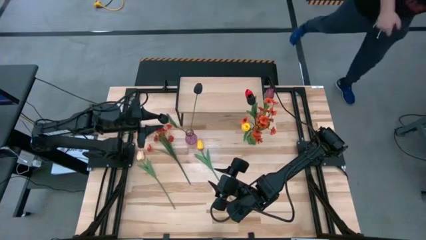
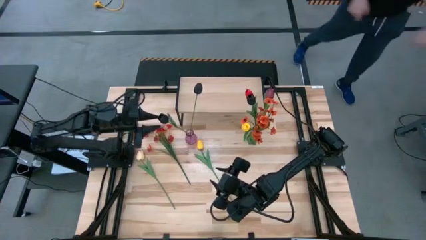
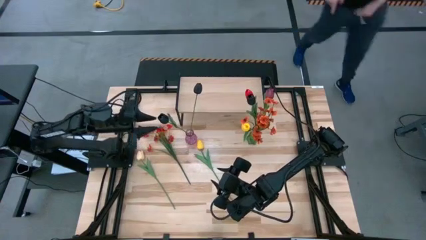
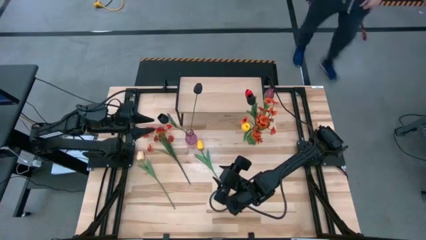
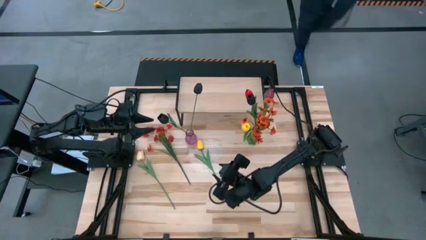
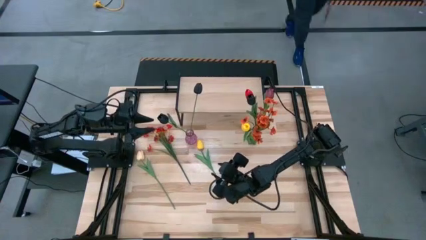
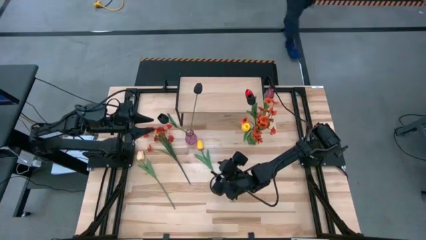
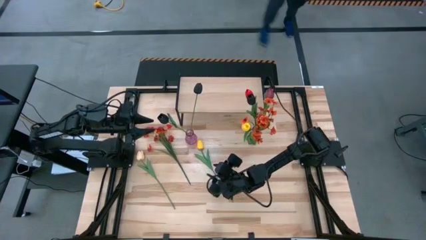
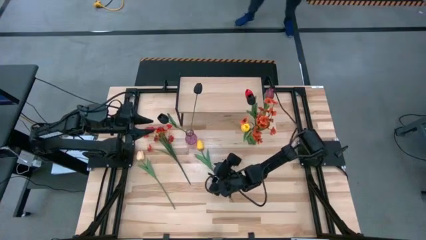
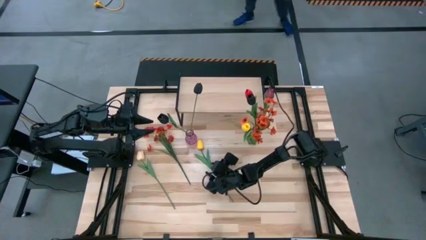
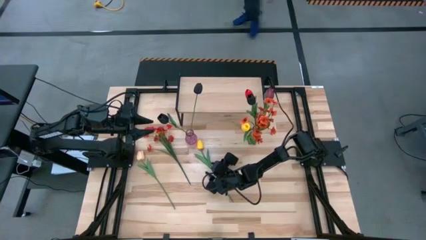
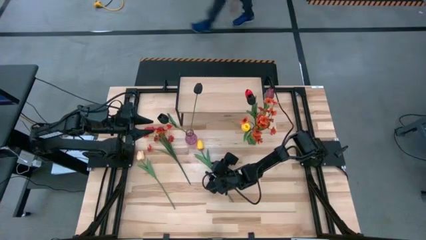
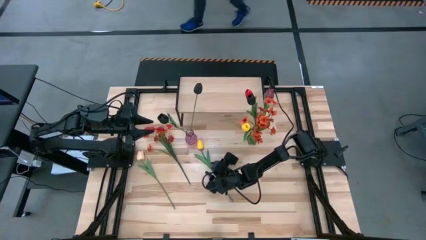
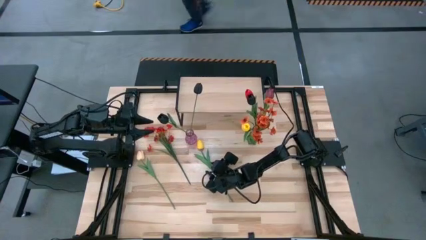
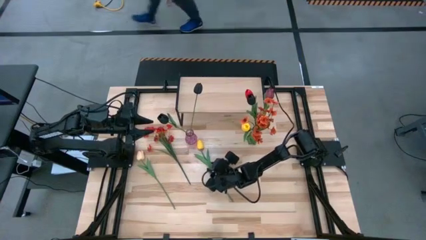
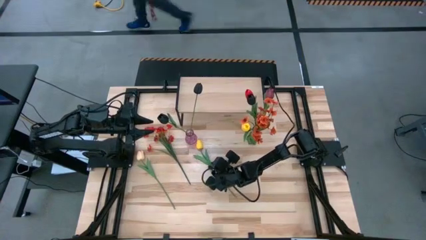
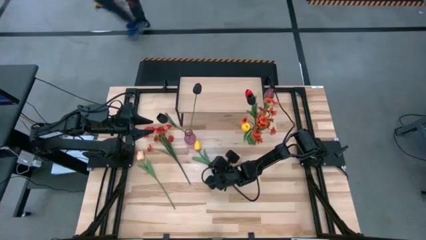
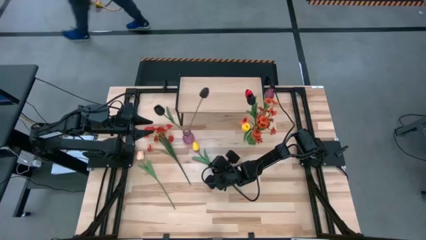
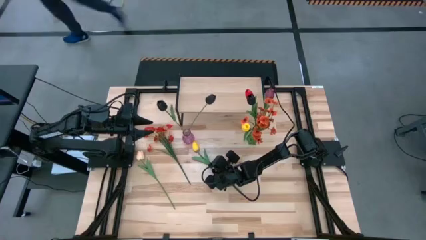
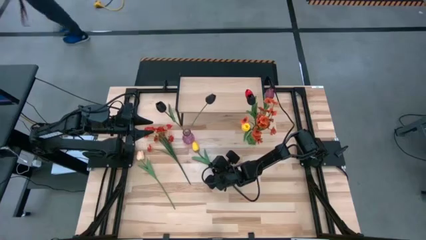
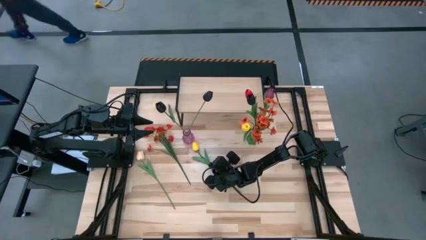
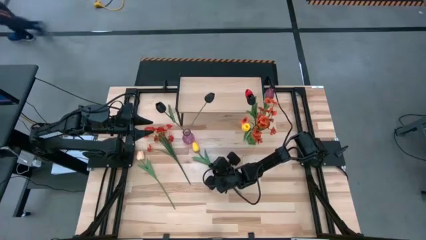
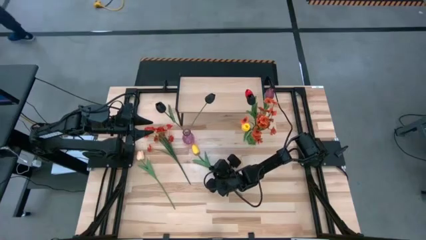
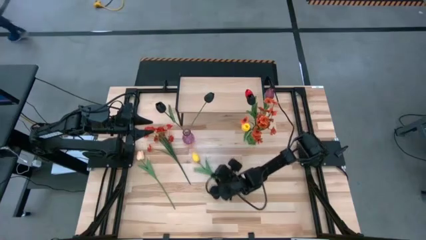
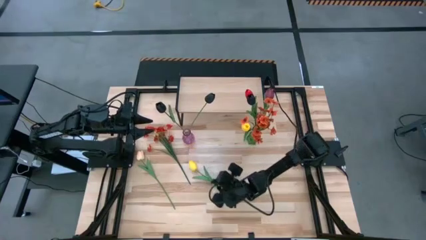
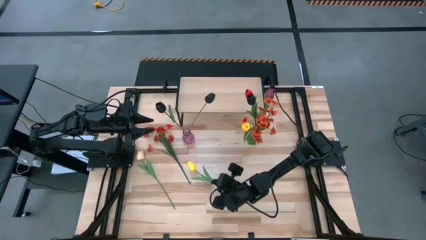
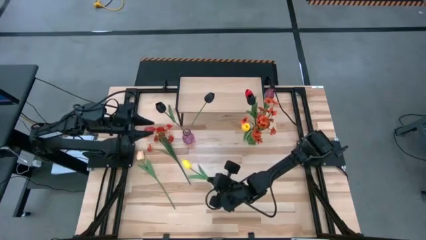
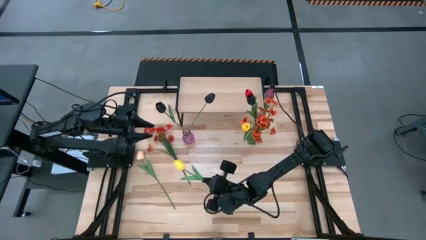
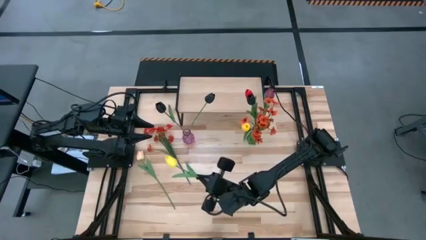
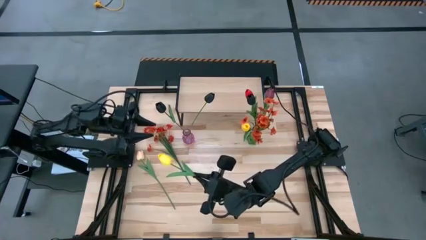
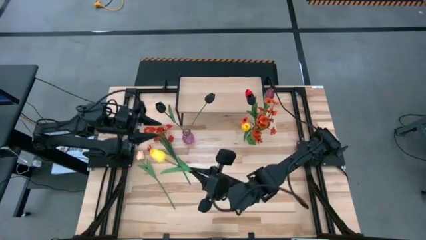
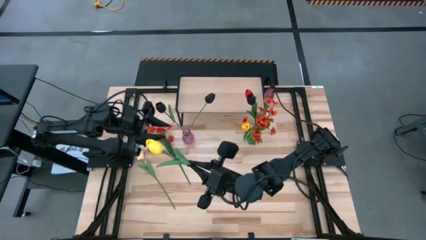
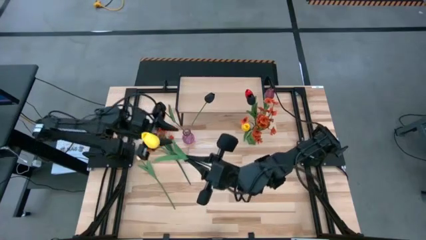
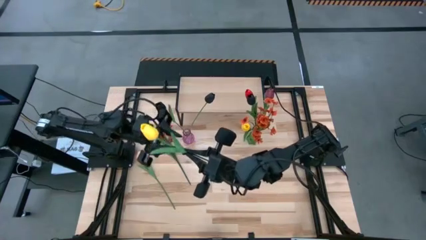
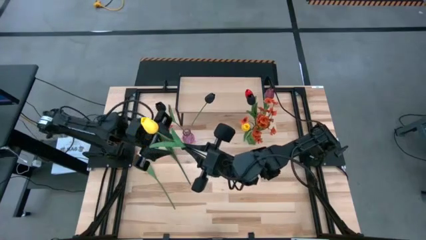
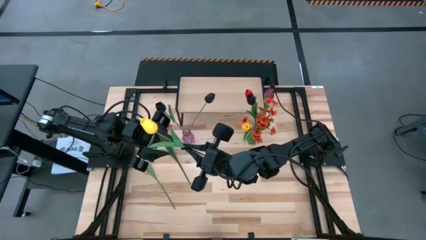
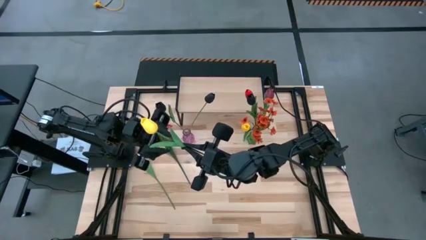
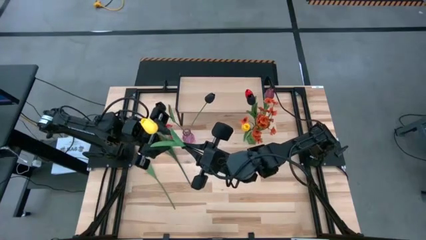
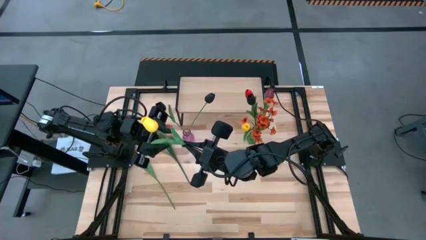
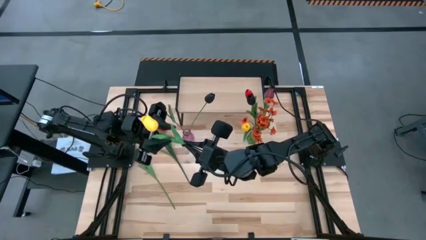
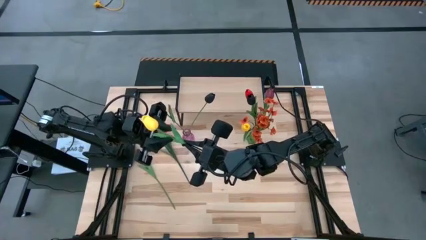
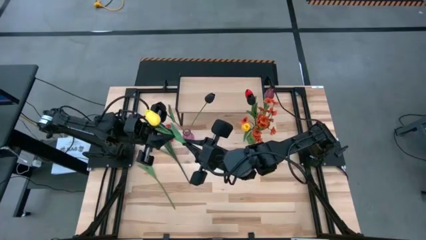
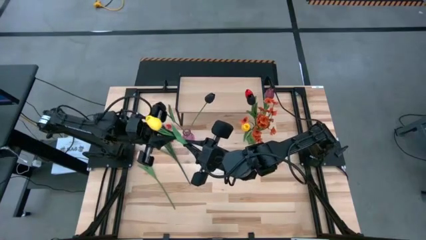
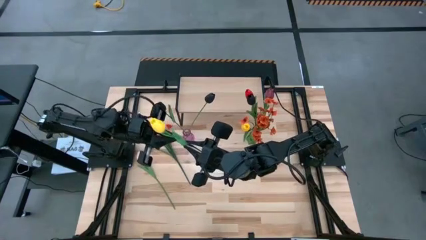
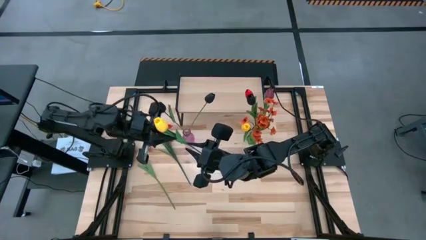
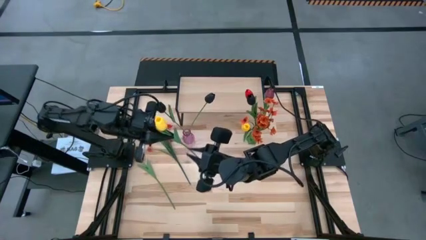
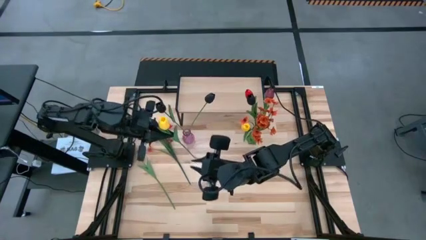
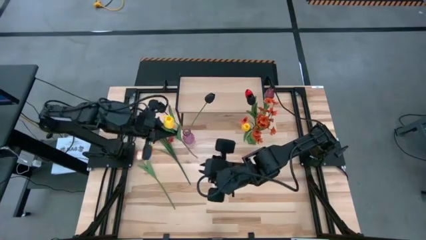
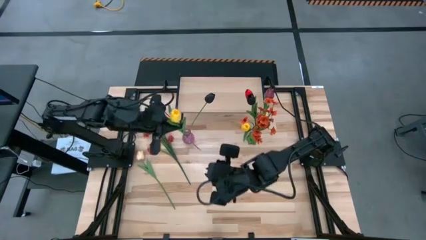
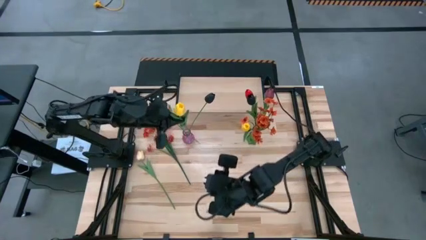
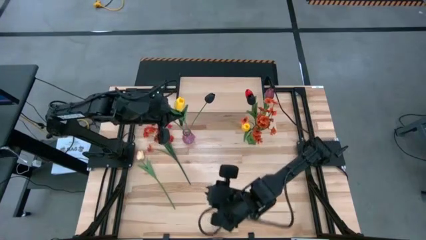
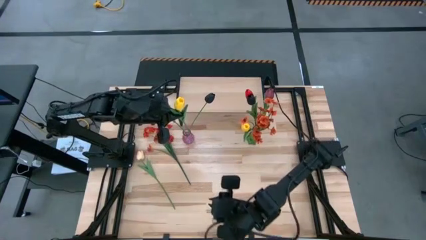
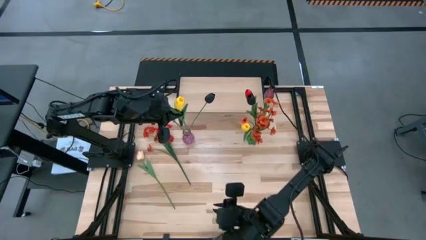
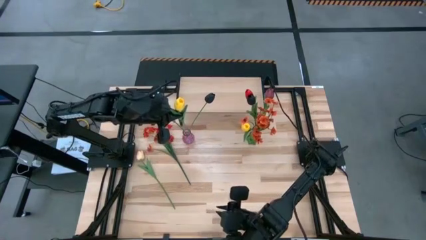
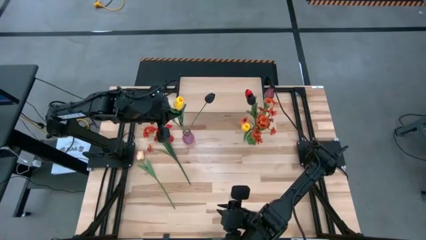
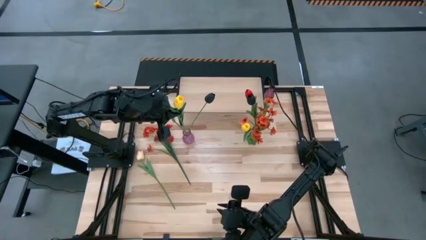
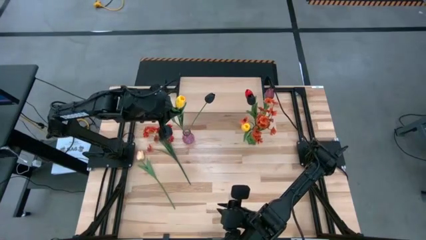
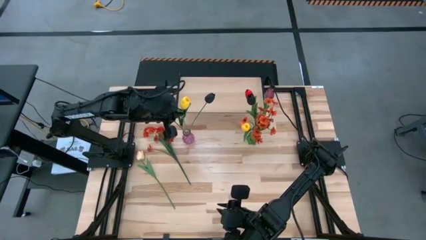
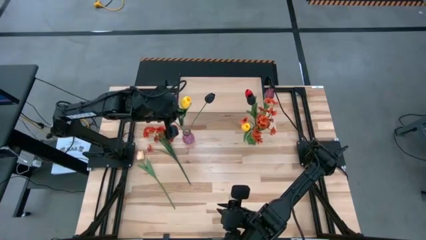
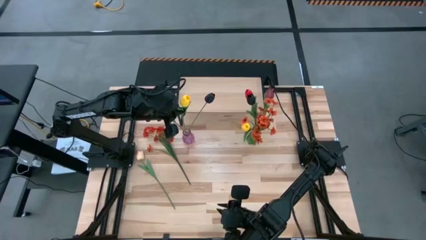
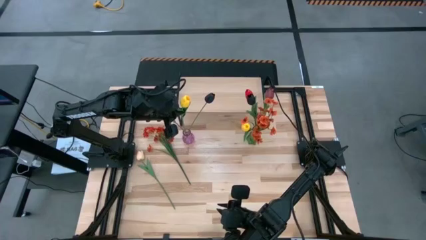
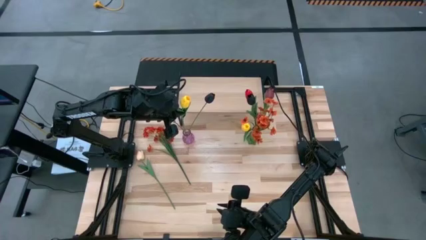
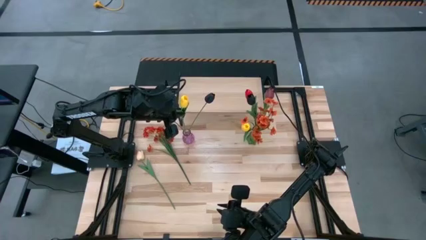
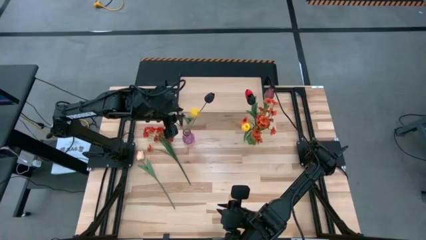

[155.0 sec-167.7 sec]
Task: Pick and place flowers into a vace then onto a shelf
Put the yellow tulip into the purple vase
